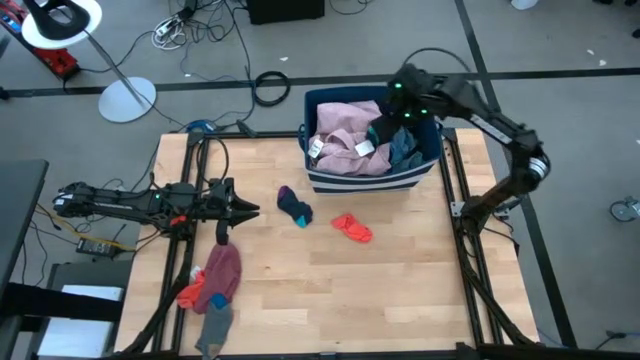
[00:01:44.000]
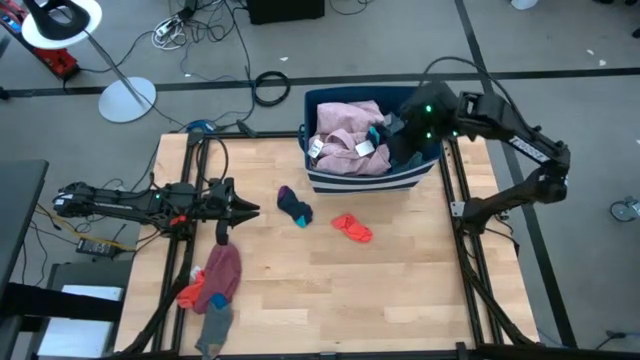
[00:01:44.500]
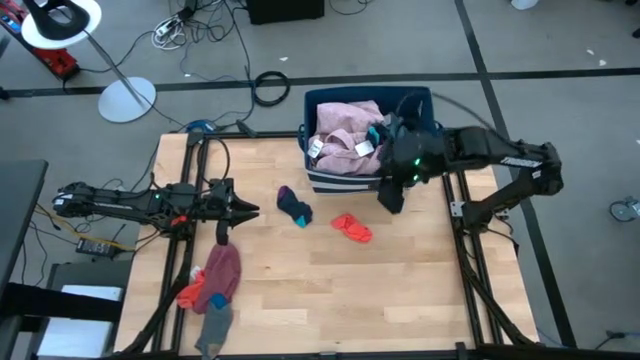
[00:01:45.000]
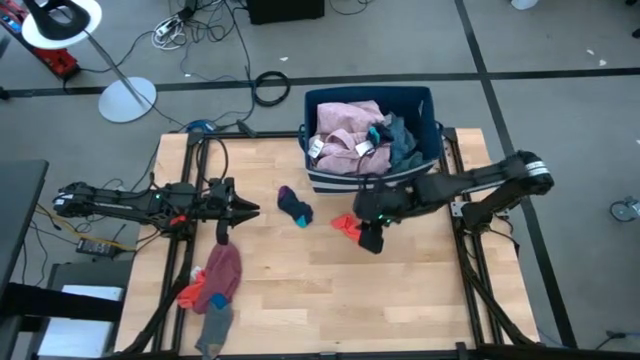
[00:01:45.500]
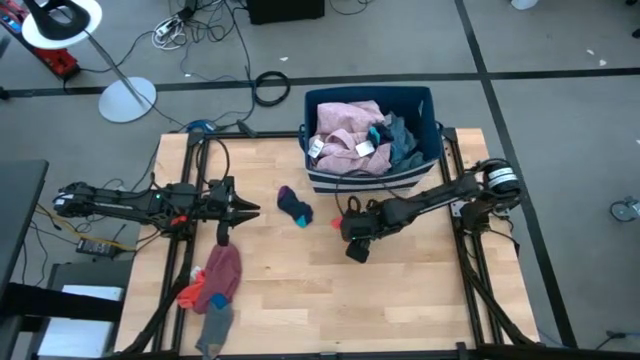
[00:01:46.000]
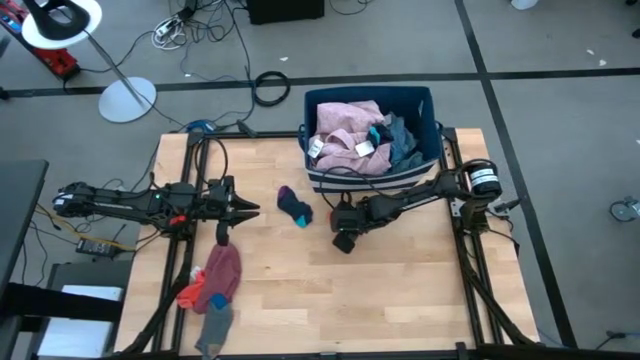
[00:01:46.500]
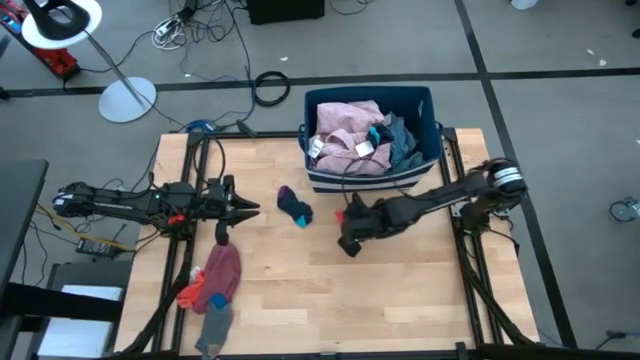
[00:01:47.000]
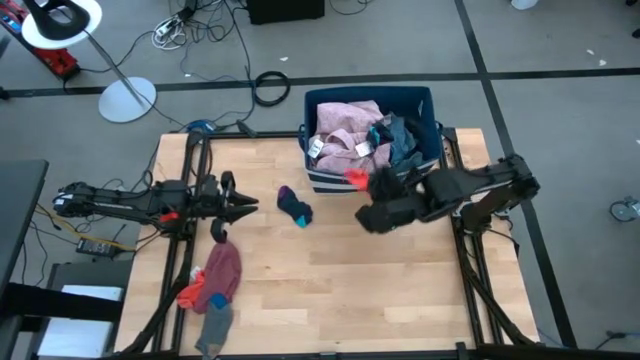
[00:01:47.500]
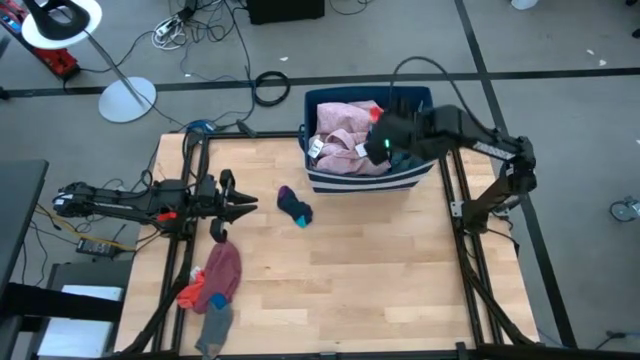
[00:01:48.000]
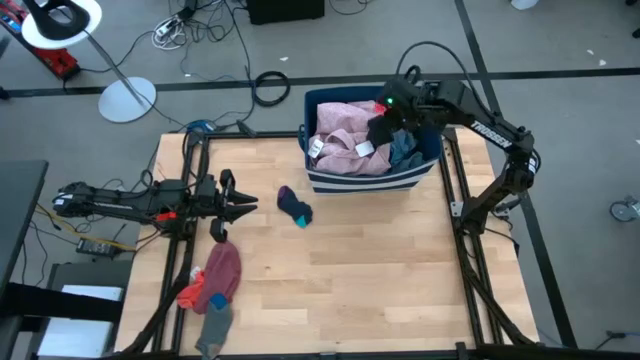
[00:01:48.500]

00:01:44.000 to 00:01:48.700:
Task: Sort clothes
Put the top orange socks into the blue bin

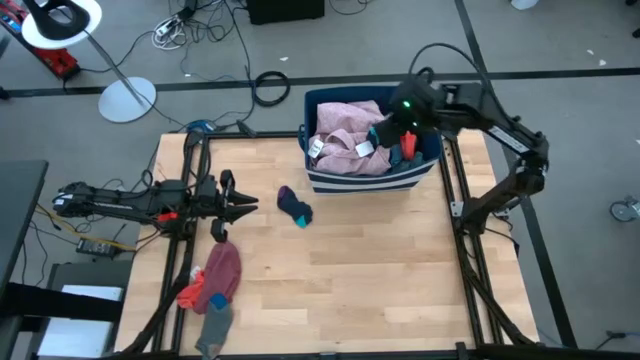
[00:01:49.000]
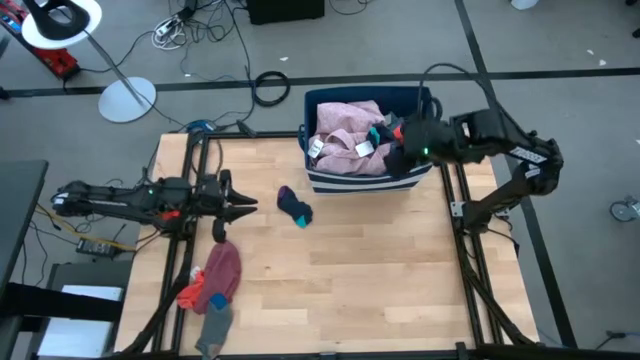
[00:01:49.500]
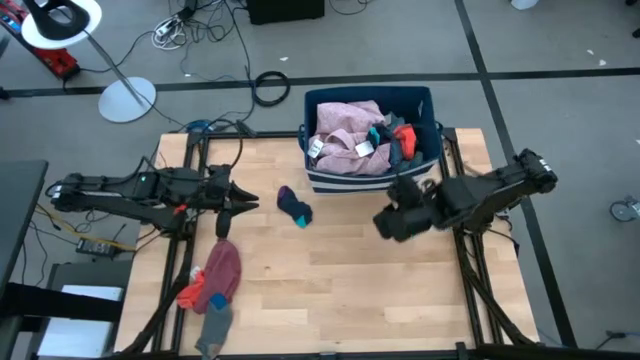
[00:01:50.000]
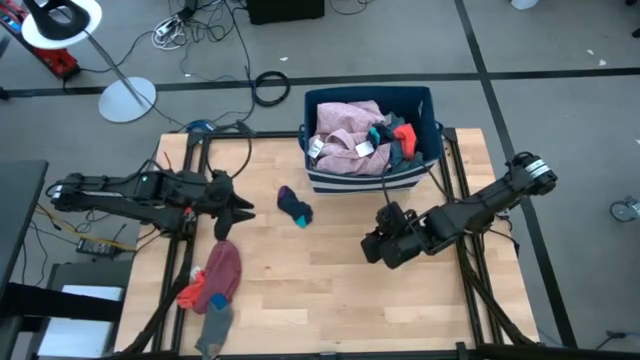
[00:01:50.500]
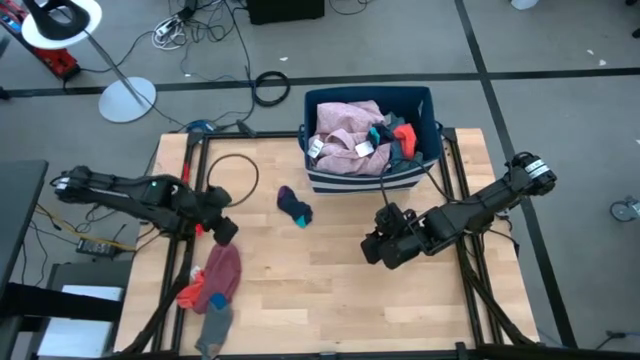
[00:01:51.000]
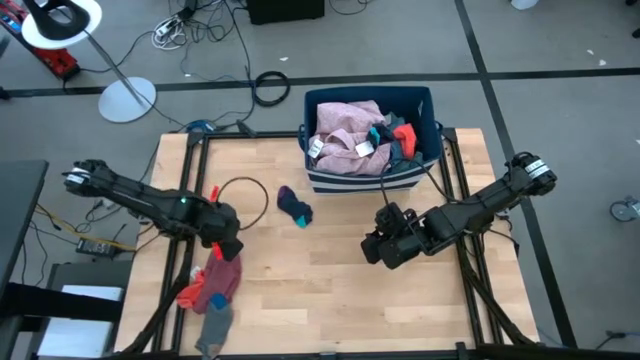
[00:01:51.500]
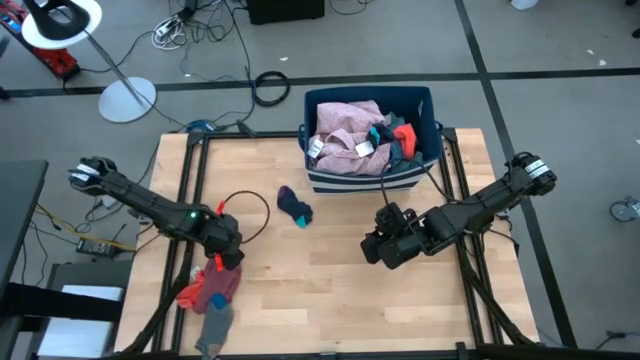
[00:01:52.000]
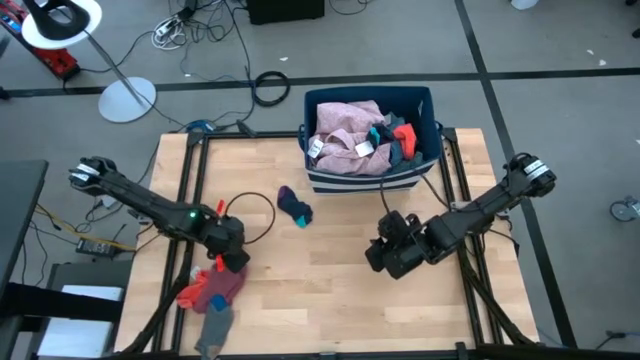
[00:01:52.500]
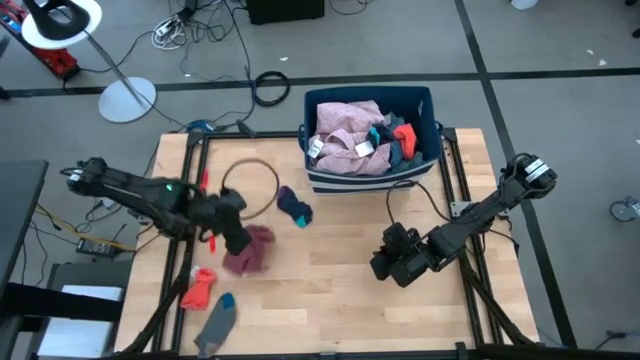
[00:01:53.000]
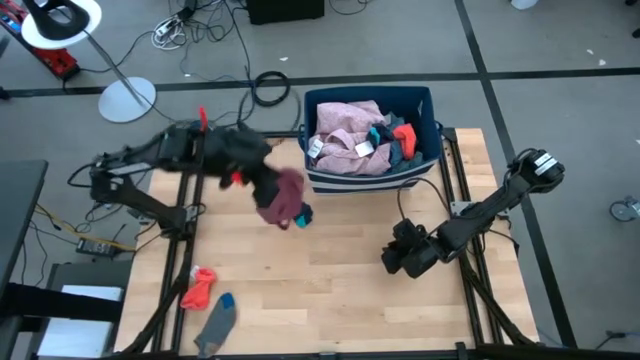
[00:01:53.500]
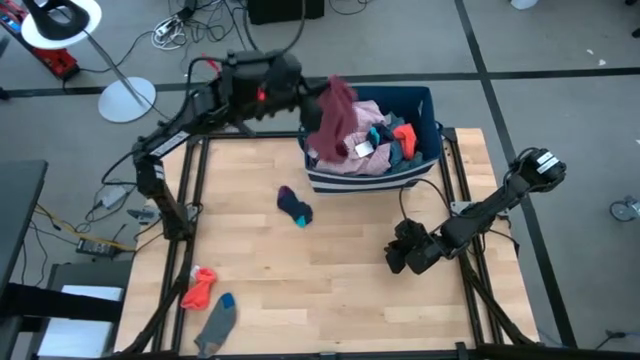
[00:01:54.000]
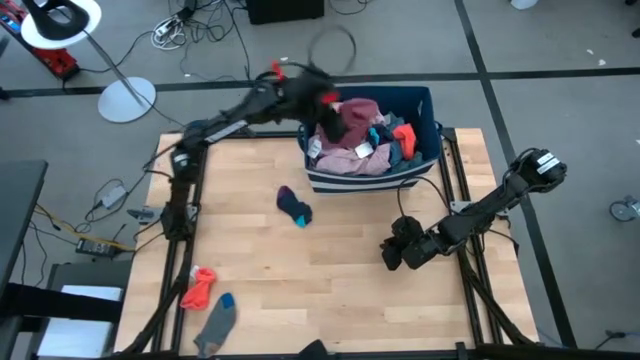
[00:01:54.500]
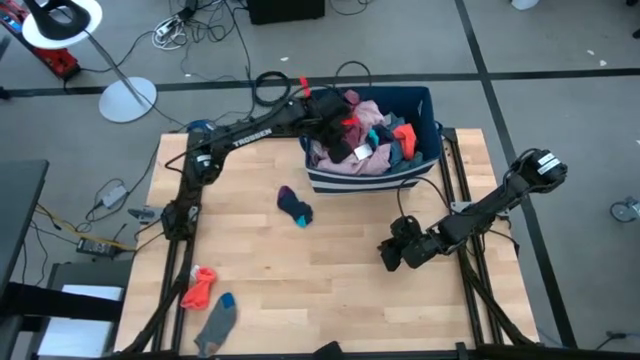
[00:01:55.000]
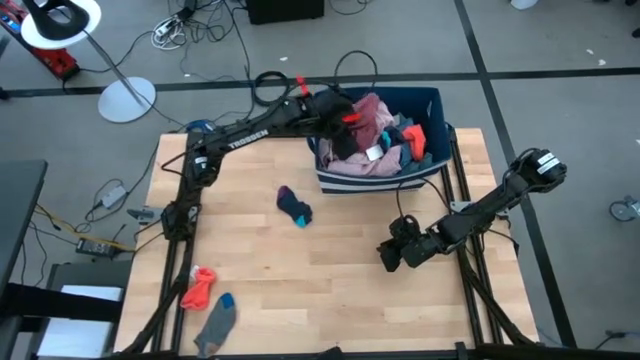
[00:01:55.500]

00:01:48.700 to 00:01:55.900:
Put the pink underwear into the blue bin

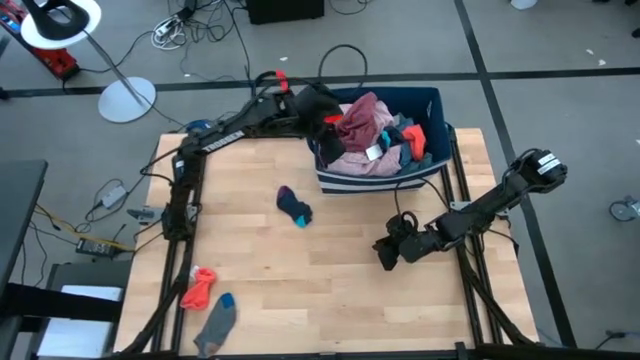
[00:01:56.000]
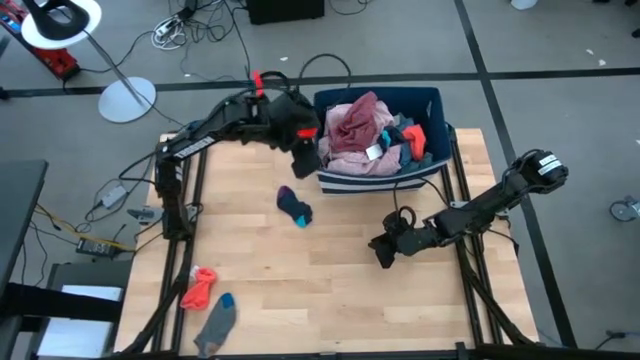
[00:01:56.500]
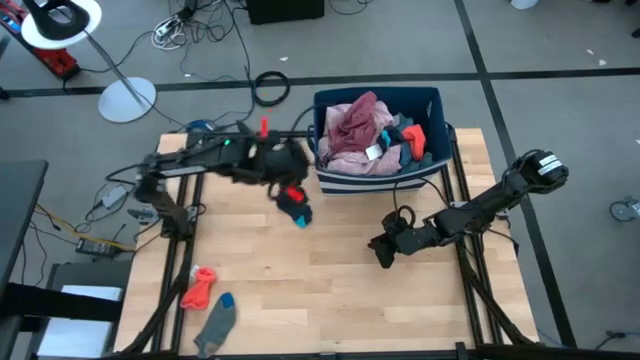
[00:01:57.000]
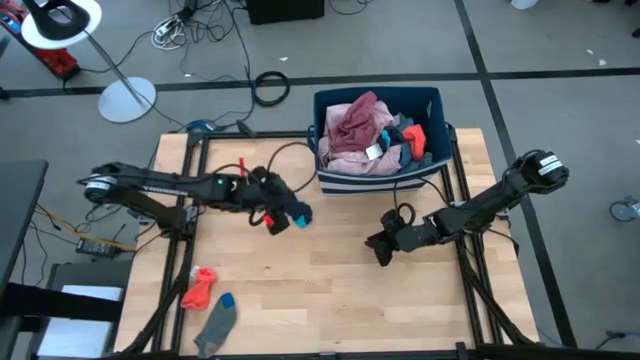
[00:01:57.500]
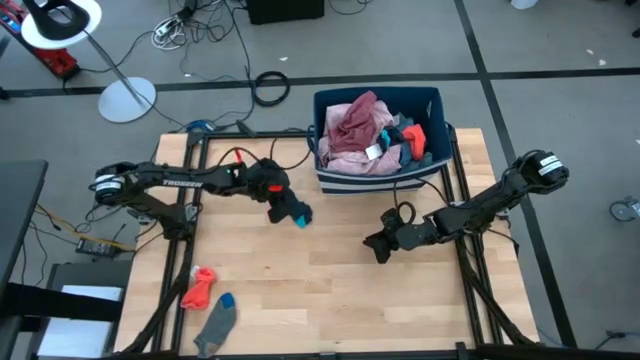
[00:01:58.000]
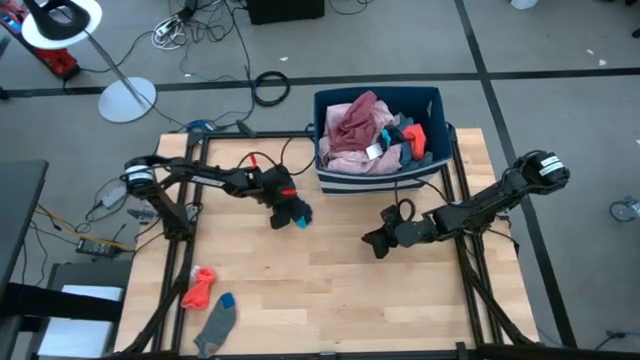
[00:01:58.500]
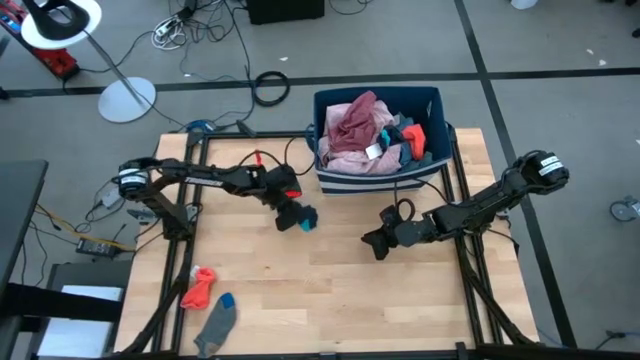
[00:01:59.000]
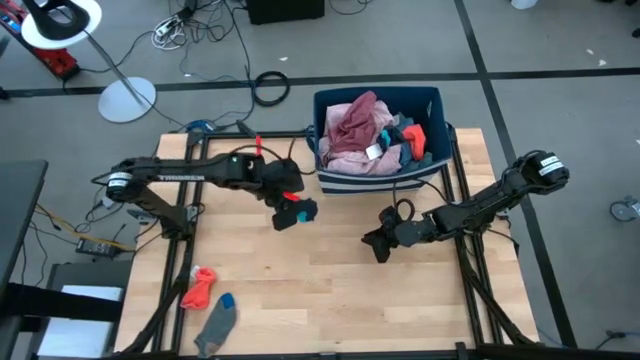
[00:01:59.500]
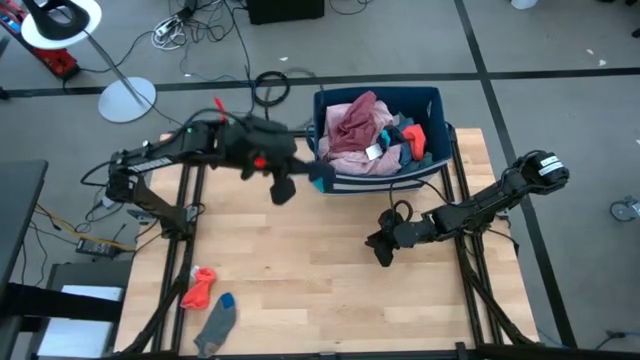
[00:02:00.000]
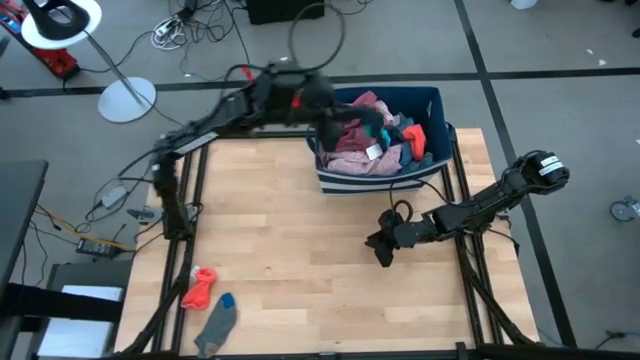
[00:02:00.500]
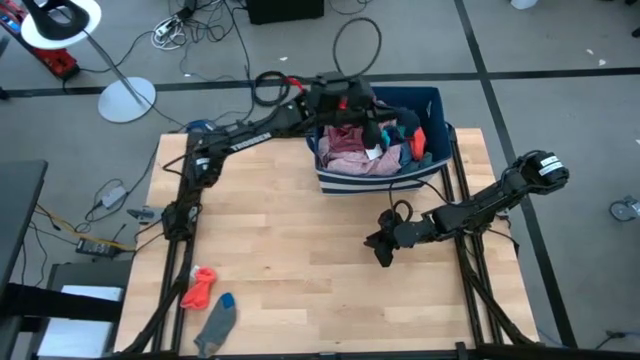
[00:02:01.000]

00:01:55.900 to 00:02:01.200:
Put the dark blue socks into the blue bin

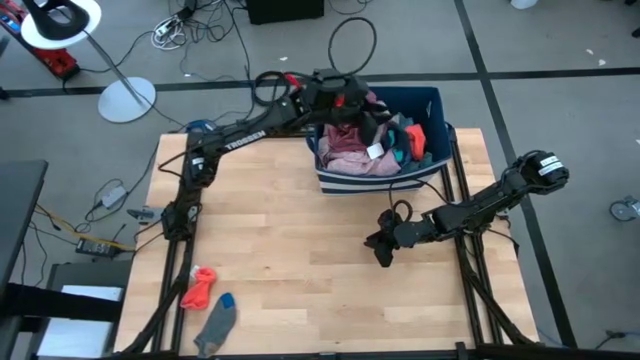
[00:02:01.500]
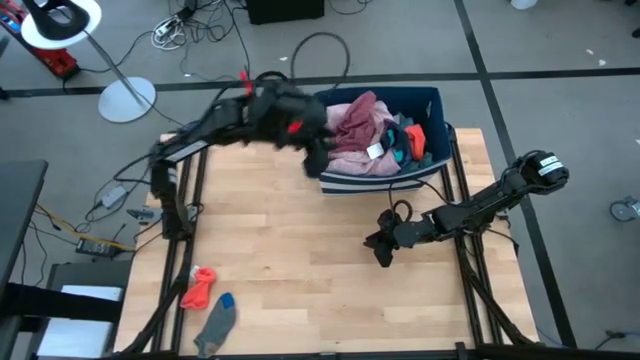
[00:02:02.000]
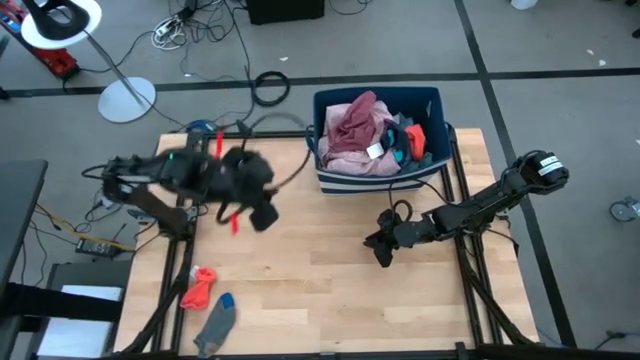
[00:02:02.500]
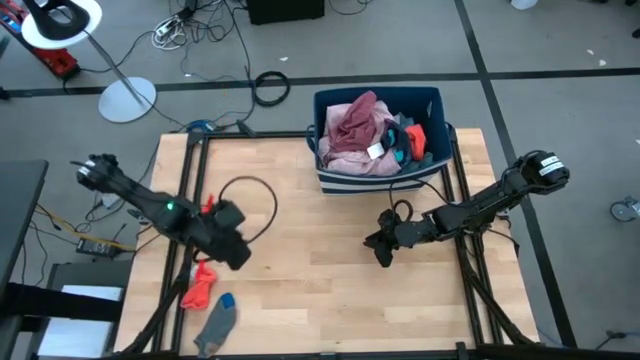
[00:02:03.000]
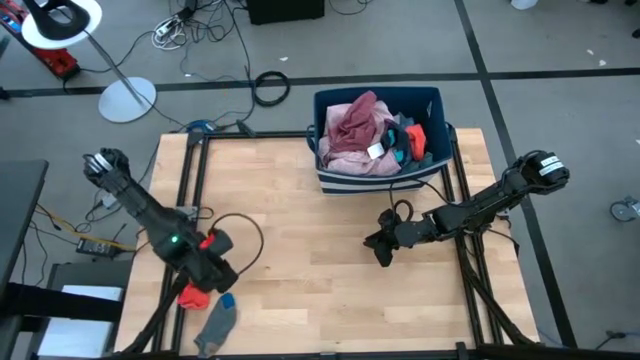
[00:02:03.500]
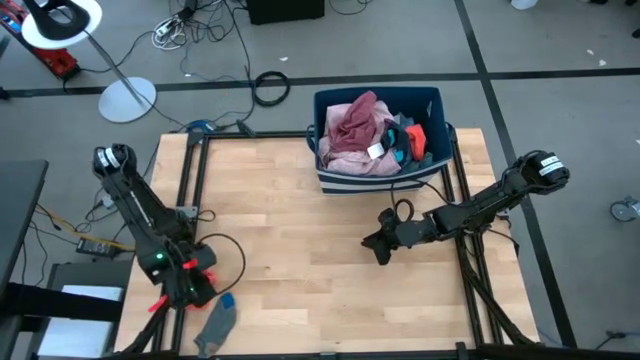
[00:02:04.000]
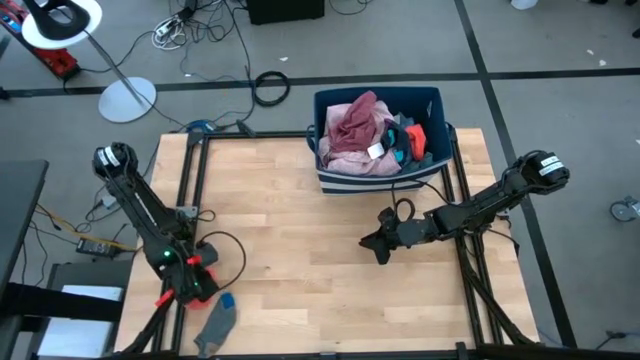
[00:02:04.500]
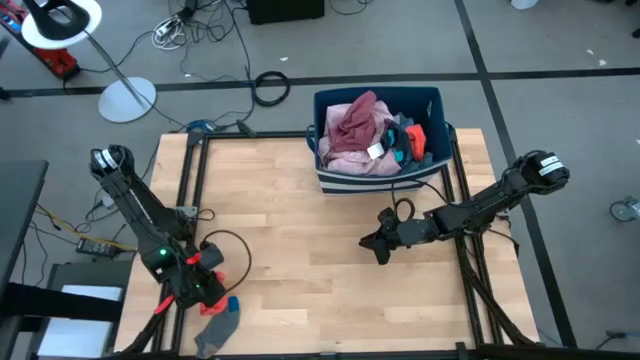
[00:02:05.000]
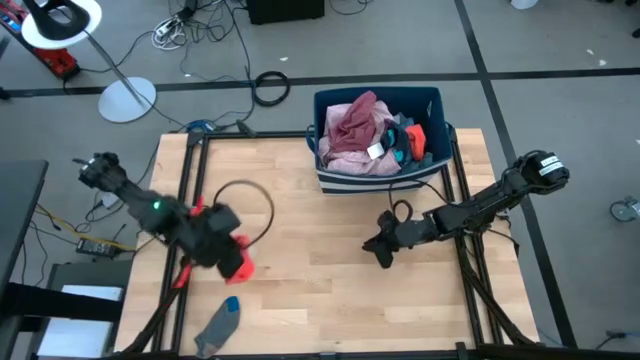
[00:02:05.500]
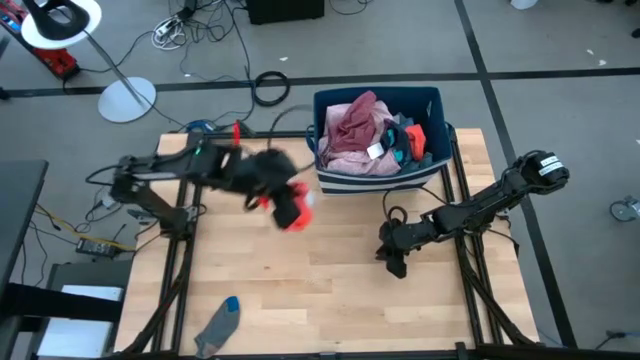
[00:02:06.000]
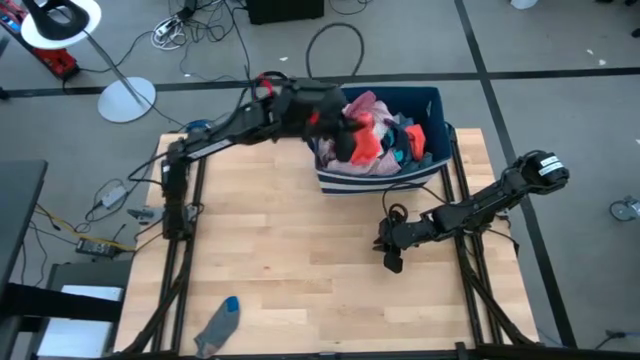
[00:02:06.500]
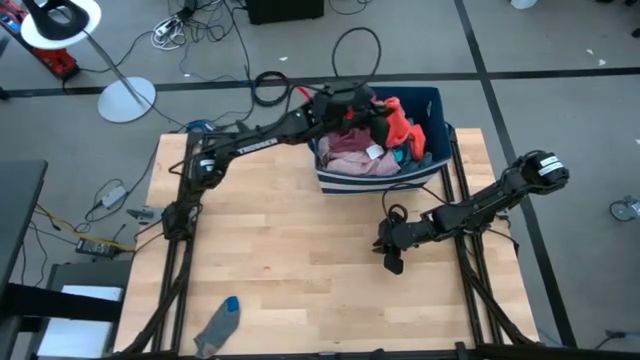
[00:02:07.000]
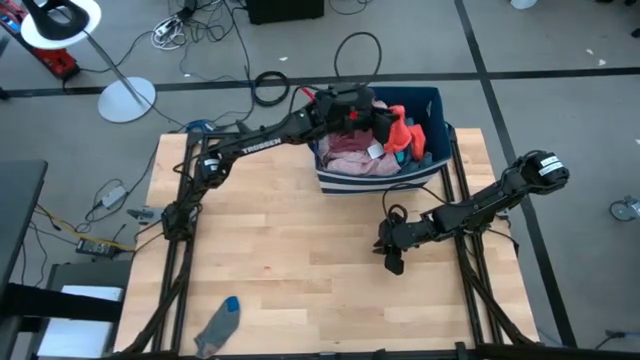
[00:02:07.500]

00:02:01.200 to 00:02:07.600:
Put the orange socks into the blue bin
